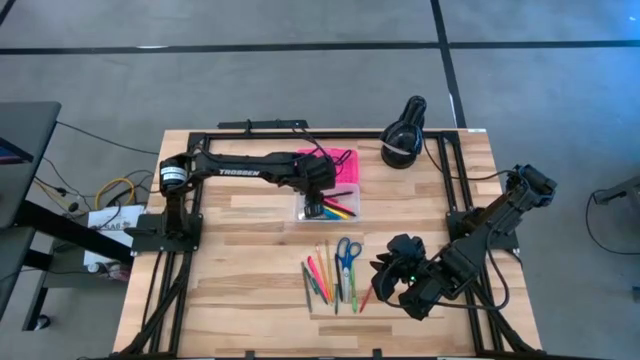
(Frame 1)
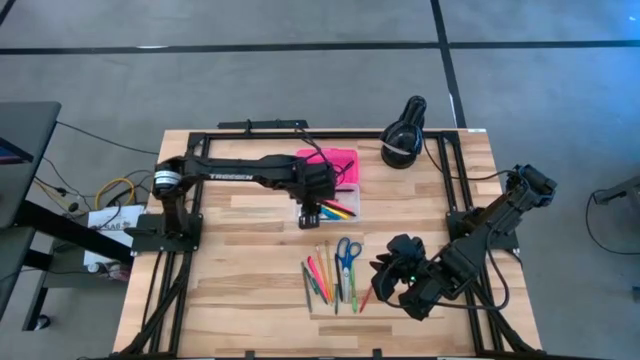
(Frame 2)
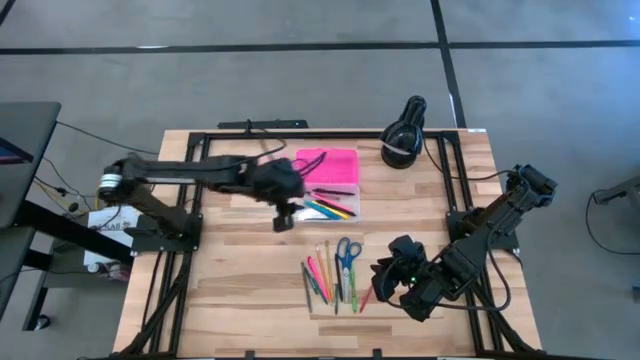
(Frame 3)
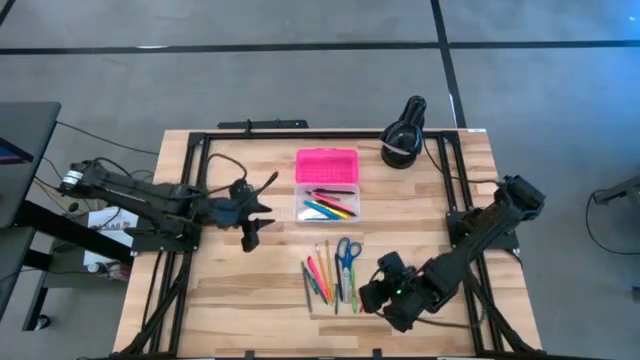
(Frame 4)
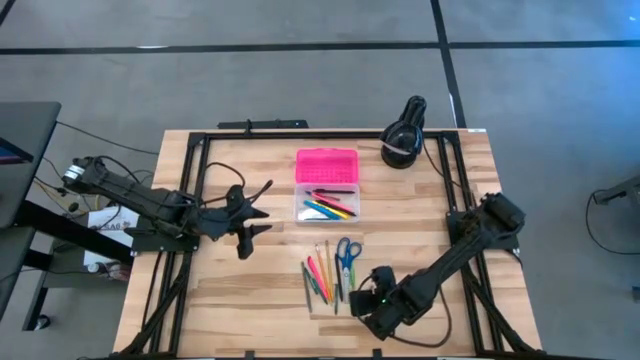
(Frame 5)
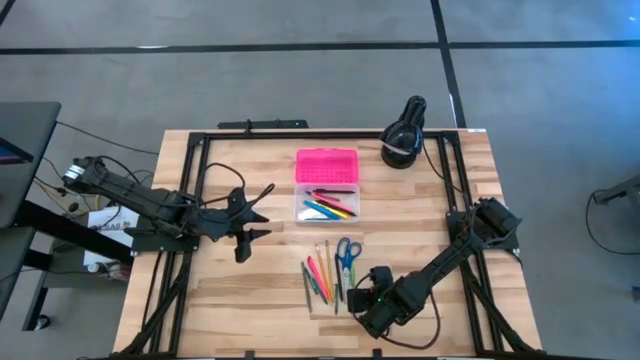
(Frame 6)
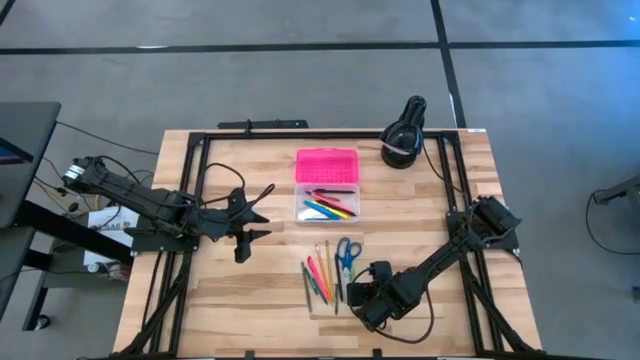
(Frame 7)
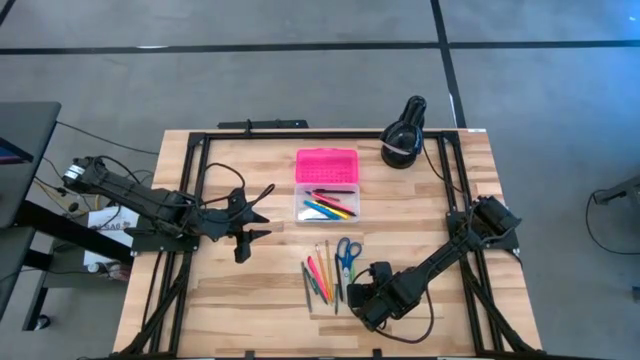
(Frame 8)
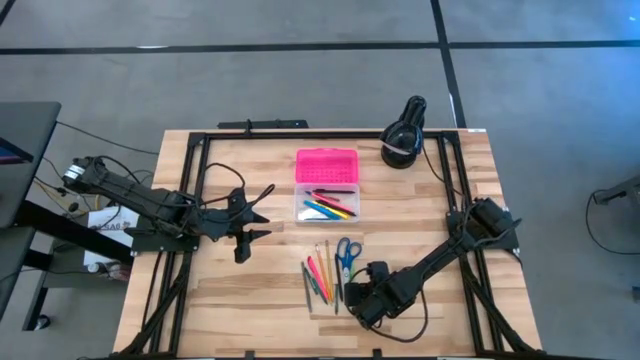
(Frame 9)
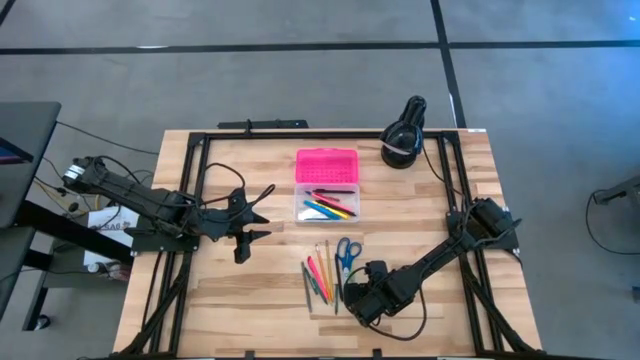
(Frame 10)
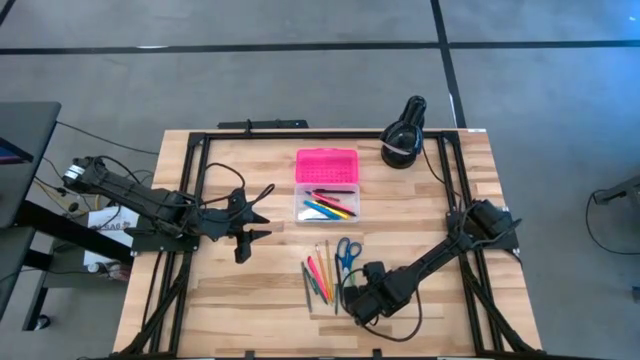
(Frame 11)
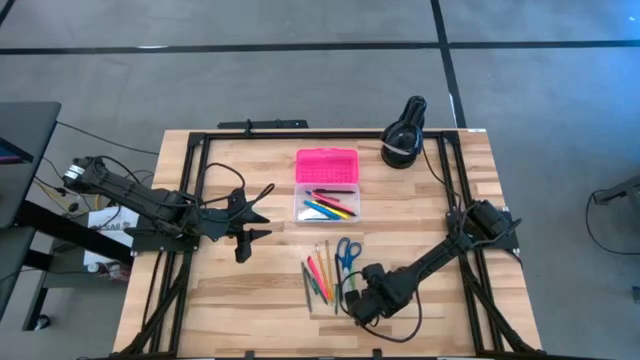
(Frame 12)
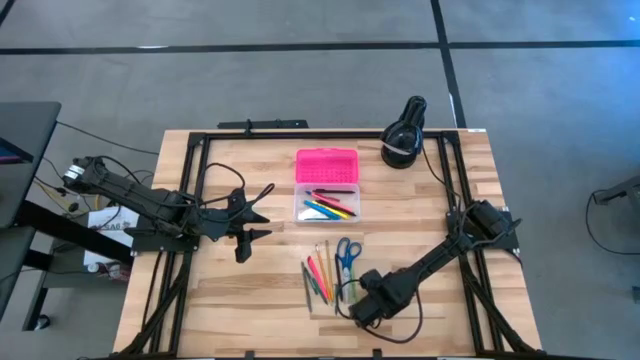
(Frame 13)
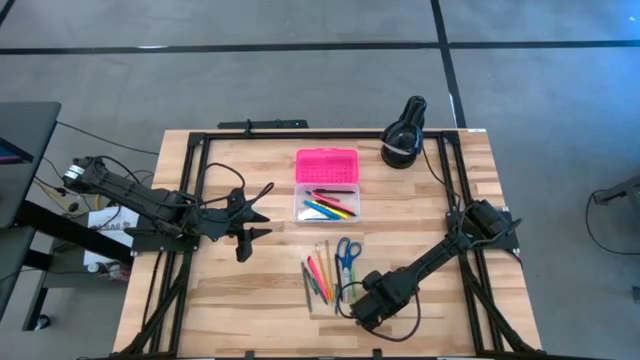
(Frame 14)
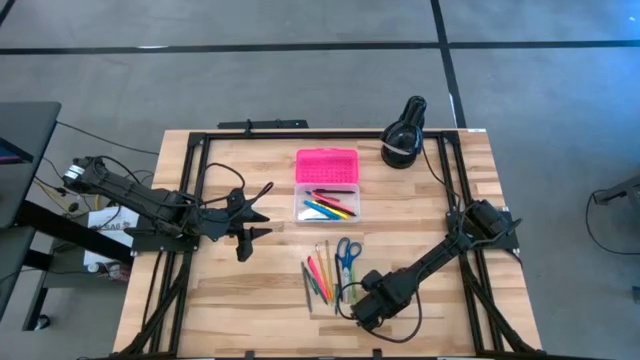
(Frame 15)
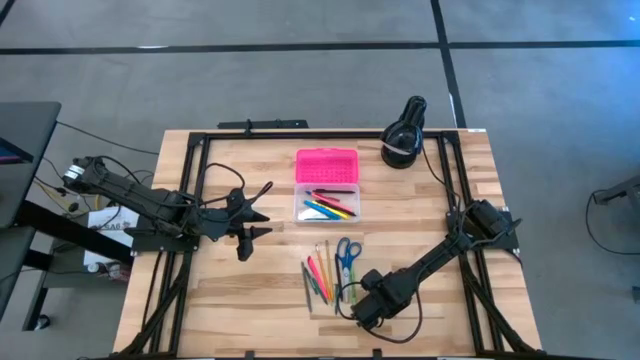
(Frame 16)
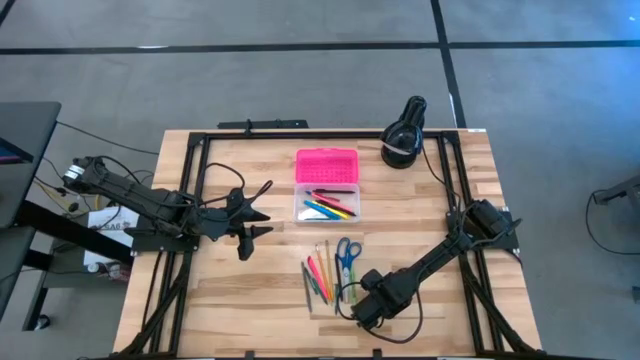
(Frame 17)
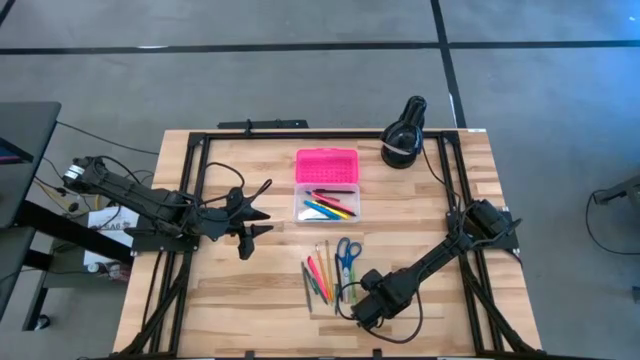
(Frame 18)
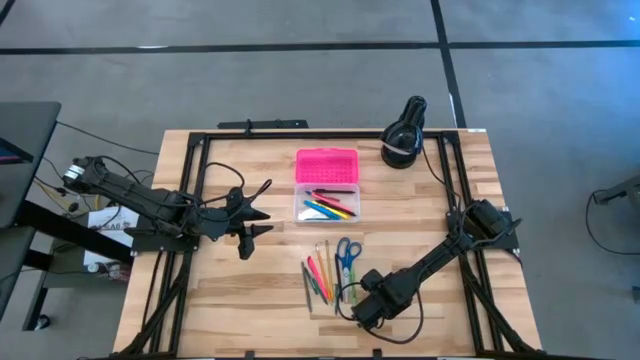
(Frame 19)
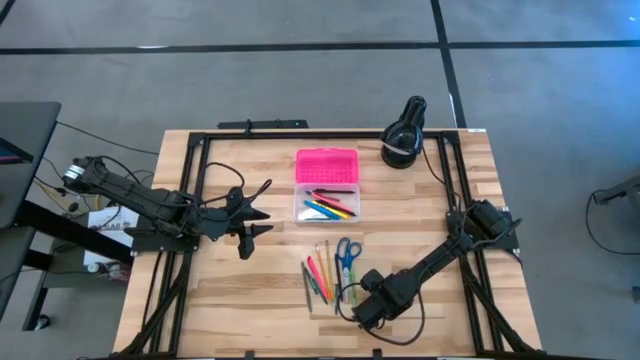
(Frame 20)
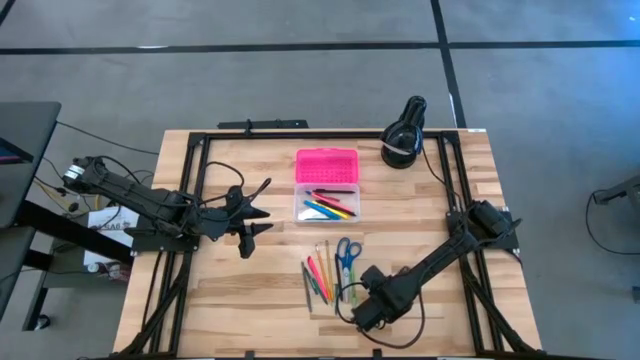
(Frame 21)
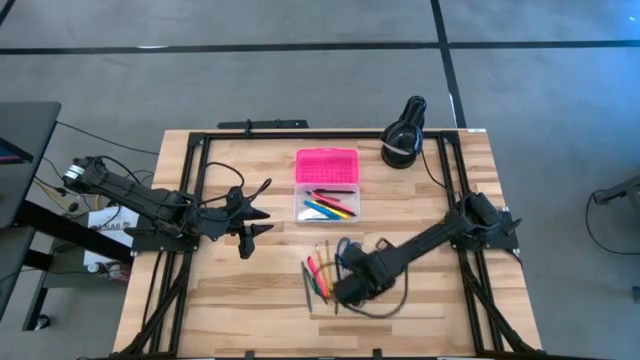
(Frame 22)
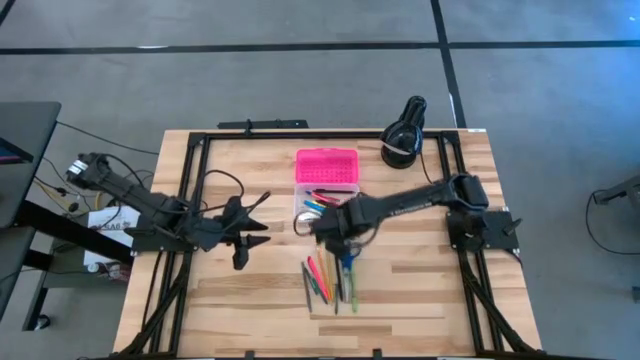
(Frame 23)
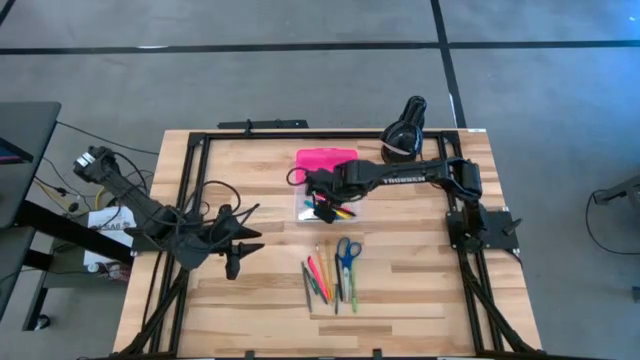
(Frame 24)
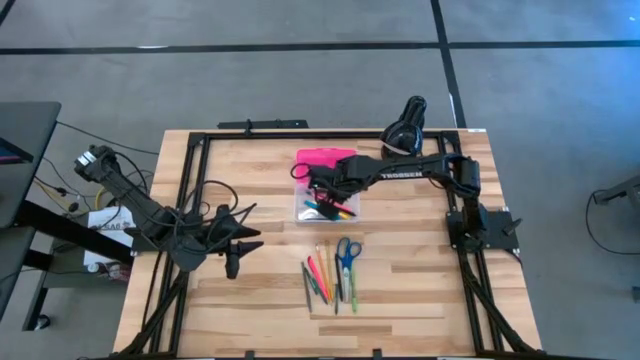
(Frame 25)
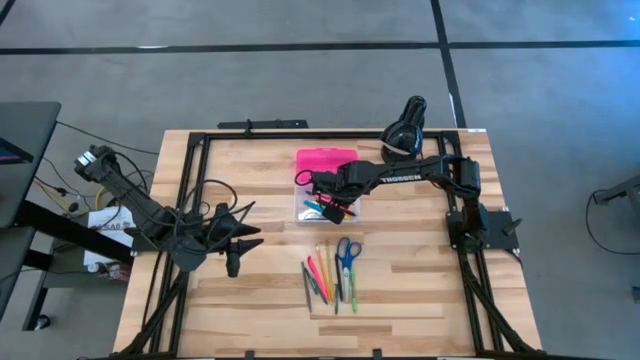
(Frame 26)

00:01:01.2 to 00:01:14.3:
Task: Pick & place school supplies into a supply box
Put the red crayon into the pink supply box

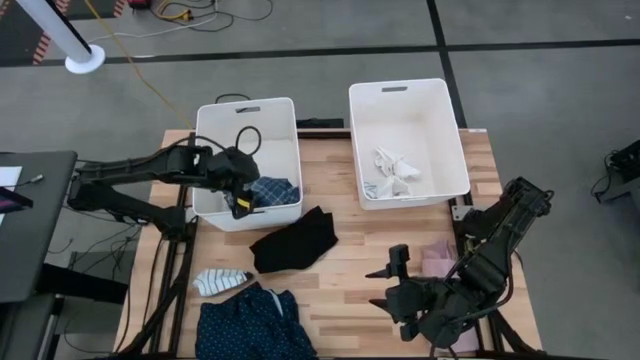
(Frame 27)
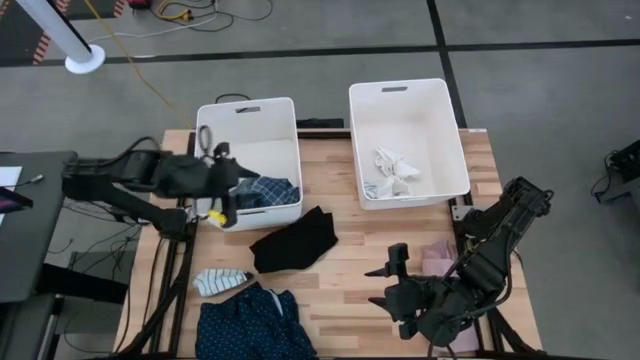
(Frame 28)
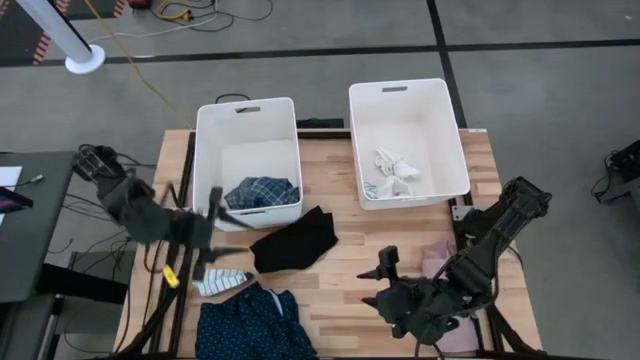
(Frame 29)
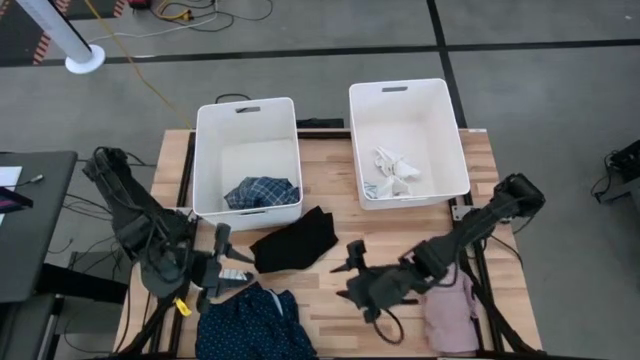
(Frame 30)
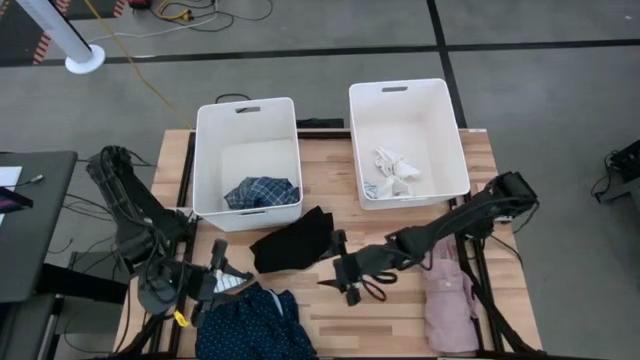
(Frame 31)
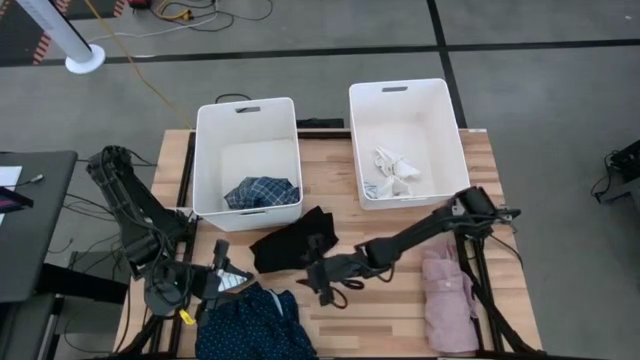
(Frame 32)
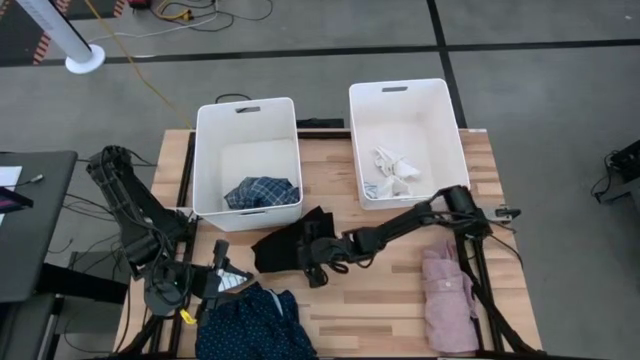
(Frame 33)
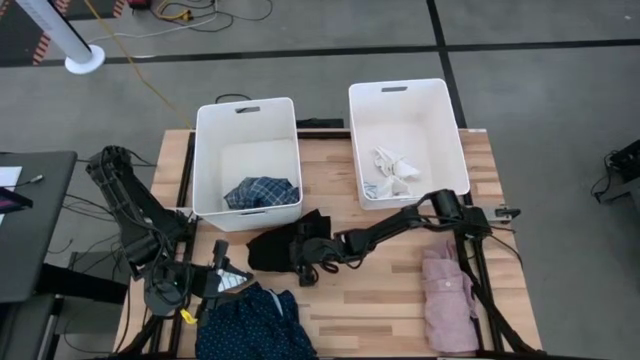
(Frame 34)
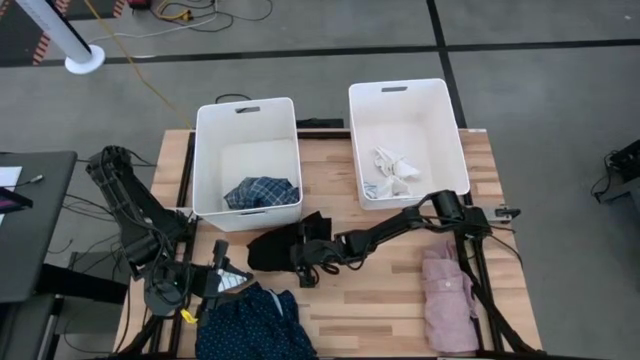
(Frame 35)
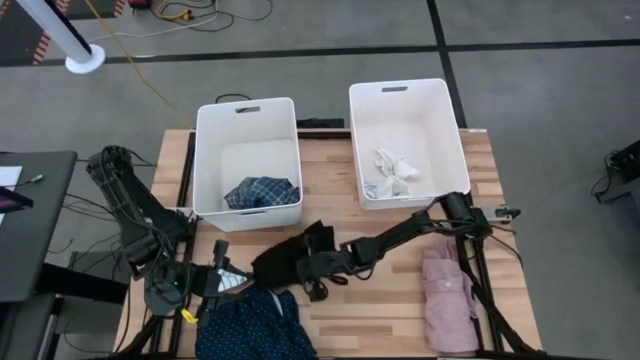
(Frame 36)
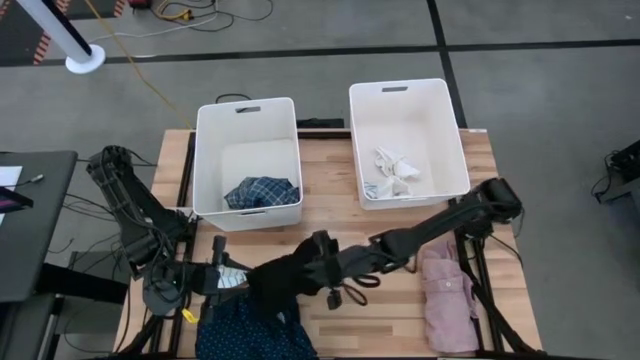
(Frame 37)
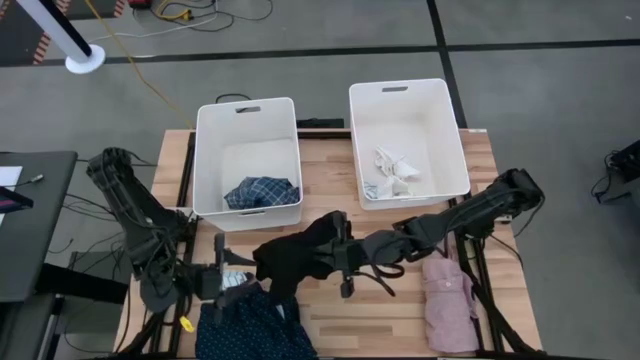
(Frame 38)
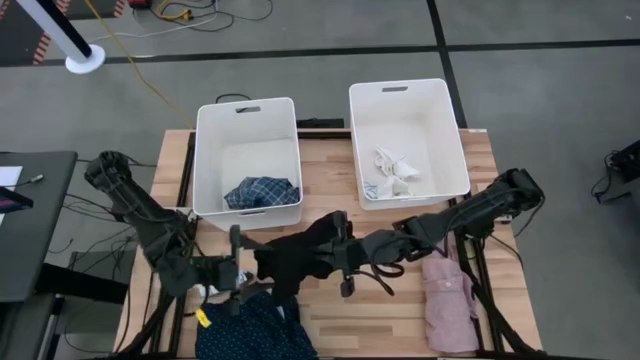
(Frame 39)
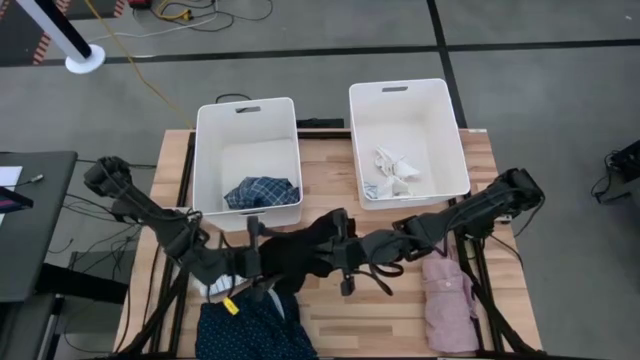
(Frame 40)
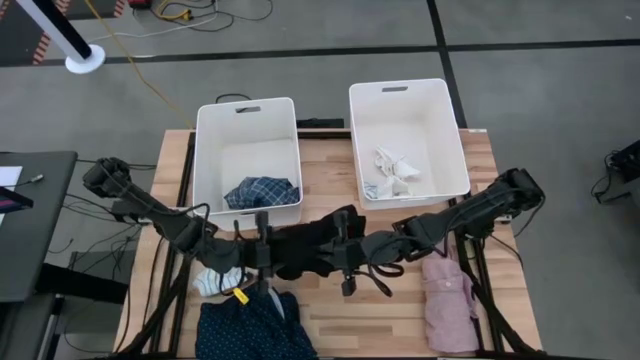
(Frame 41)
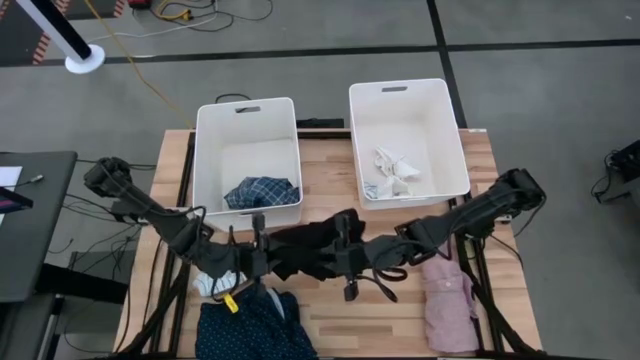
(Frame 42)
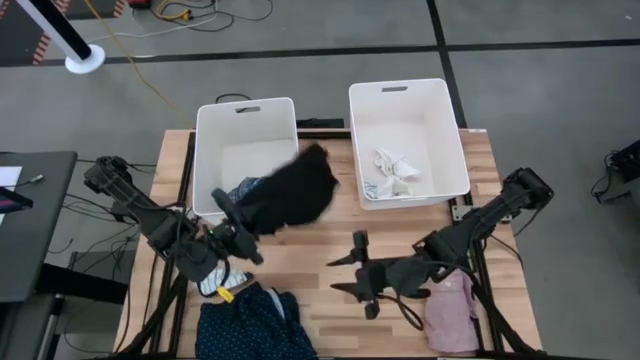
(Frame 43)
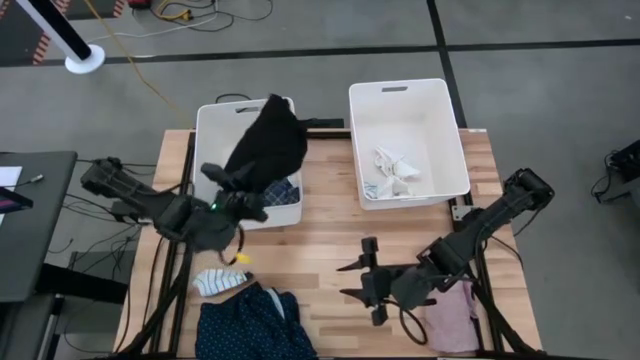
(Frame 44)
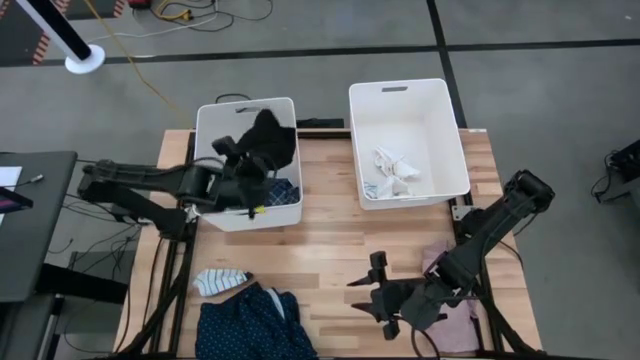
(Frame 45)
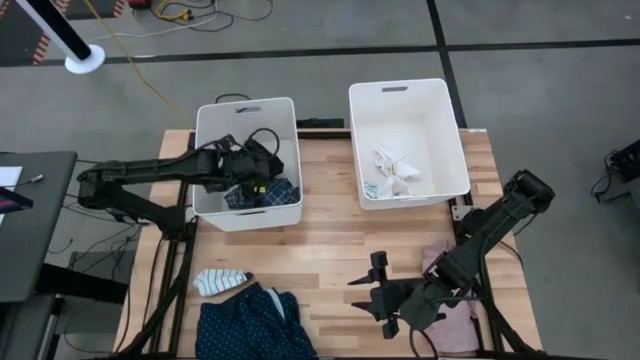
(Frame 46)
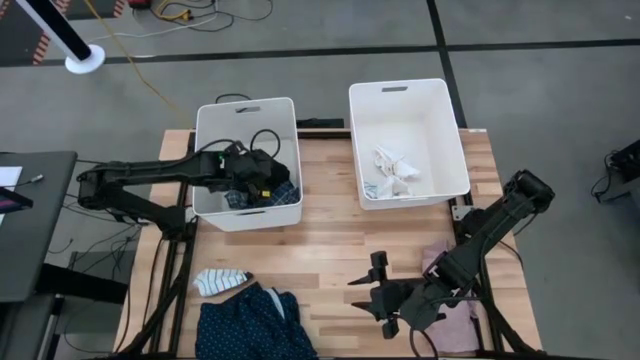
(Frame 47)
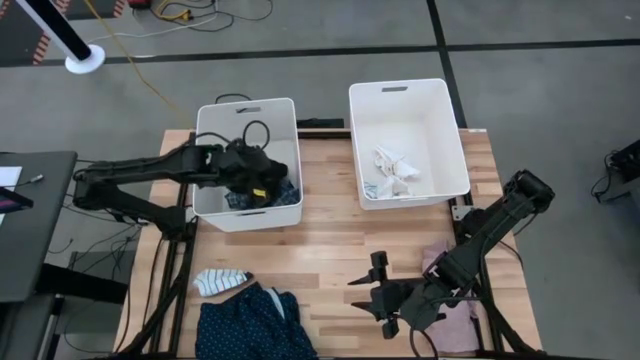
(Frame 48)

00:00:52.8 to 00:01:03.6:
Task: Sort clothes
Put the black clothes into the left bin
